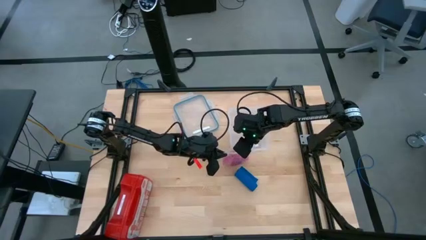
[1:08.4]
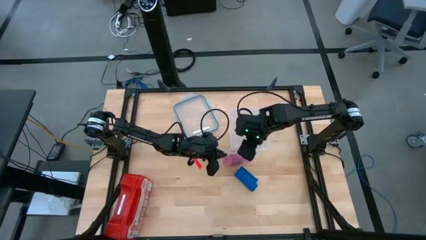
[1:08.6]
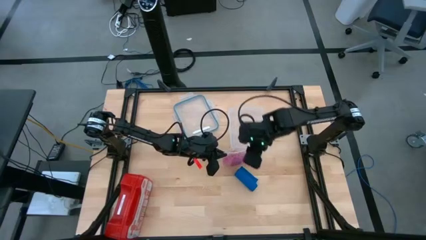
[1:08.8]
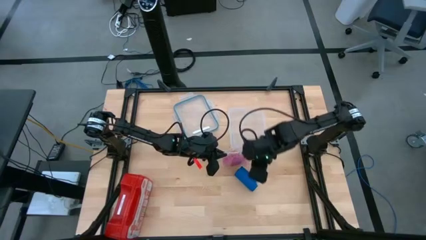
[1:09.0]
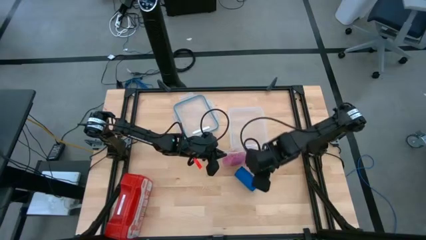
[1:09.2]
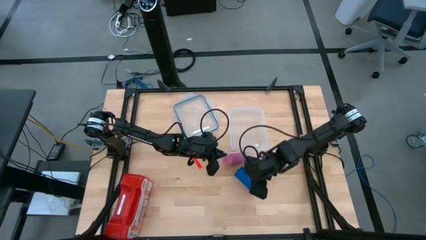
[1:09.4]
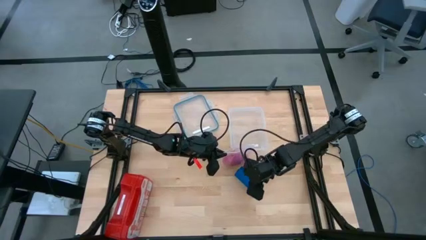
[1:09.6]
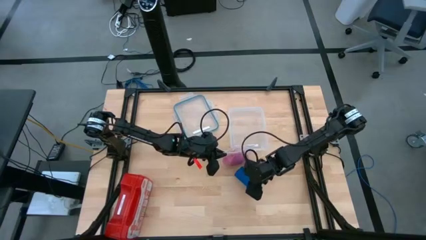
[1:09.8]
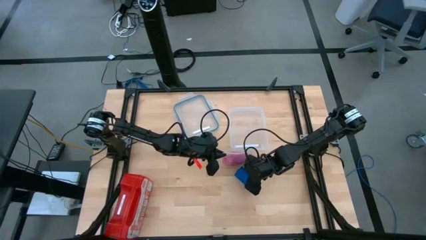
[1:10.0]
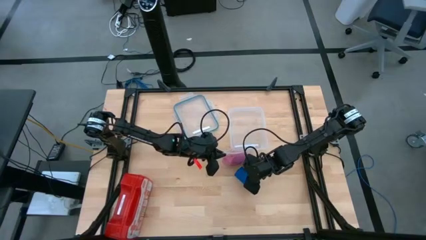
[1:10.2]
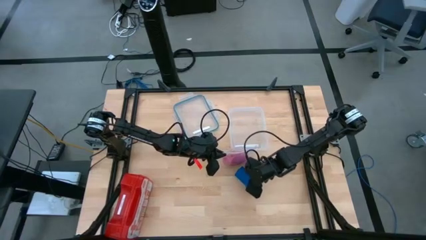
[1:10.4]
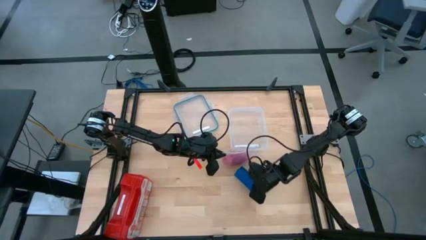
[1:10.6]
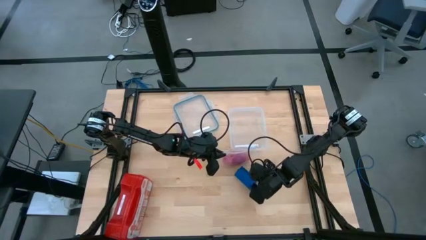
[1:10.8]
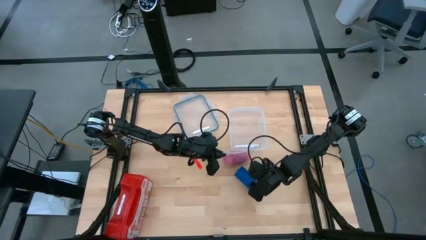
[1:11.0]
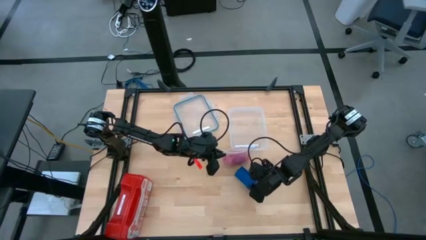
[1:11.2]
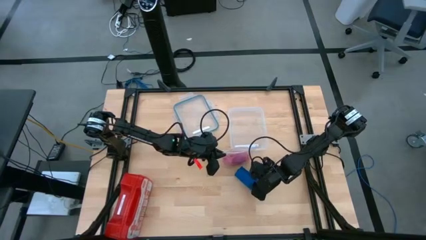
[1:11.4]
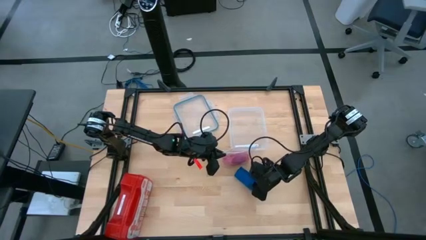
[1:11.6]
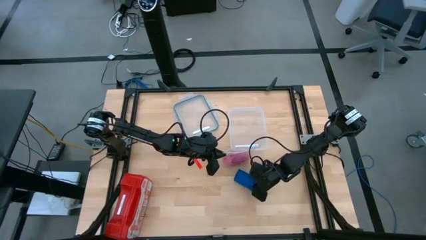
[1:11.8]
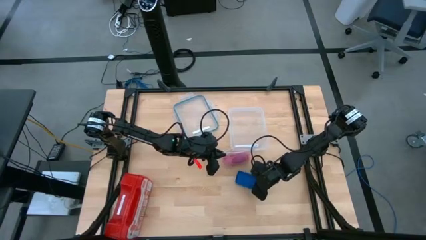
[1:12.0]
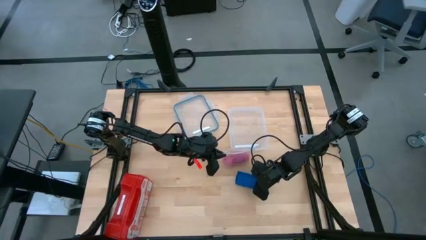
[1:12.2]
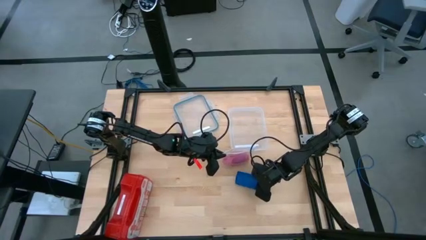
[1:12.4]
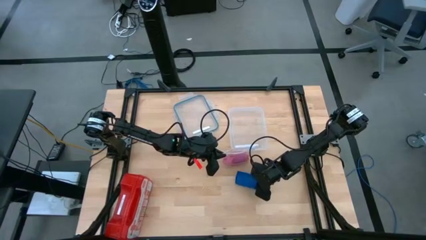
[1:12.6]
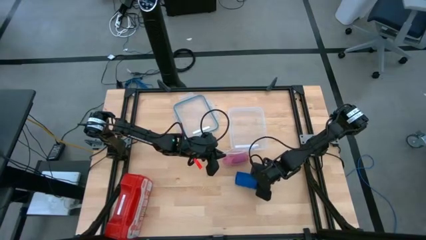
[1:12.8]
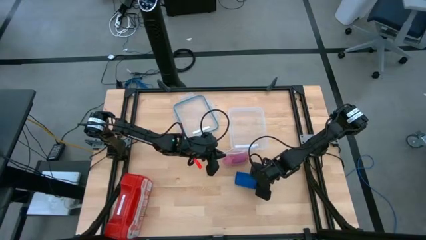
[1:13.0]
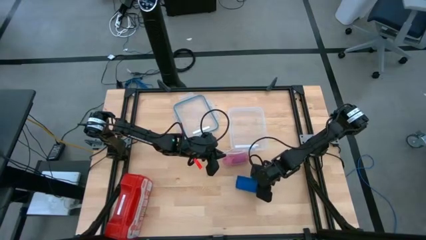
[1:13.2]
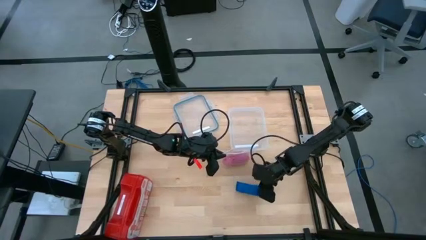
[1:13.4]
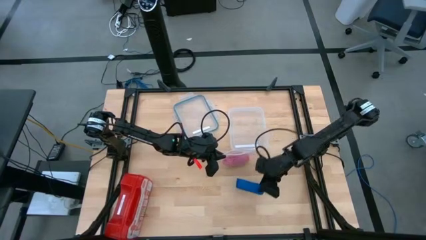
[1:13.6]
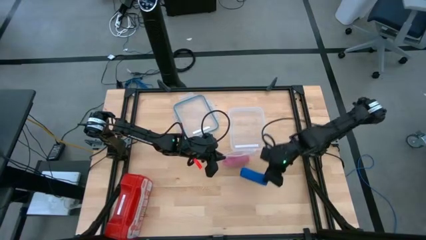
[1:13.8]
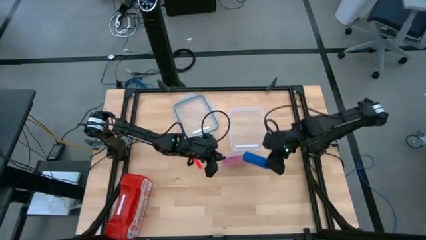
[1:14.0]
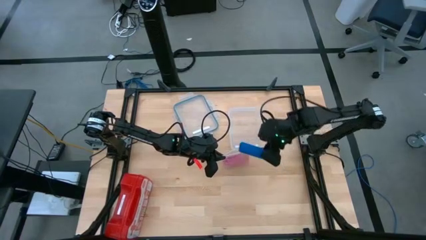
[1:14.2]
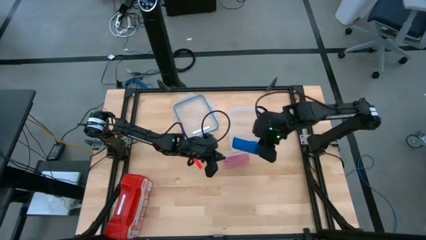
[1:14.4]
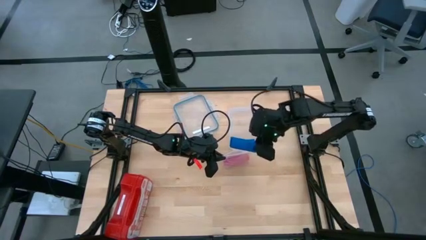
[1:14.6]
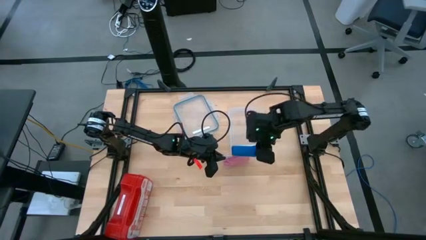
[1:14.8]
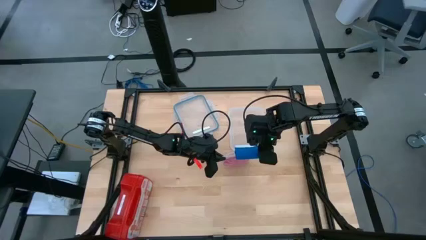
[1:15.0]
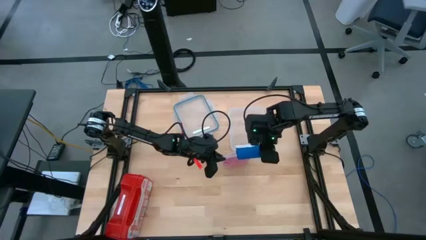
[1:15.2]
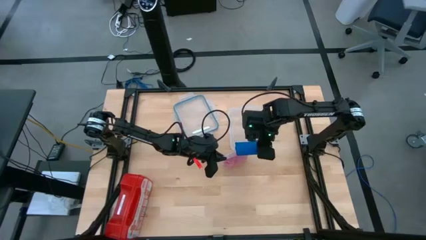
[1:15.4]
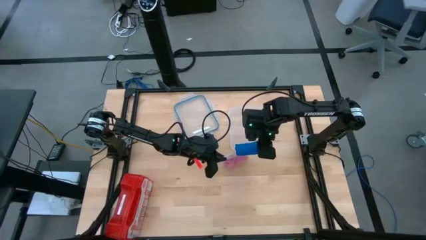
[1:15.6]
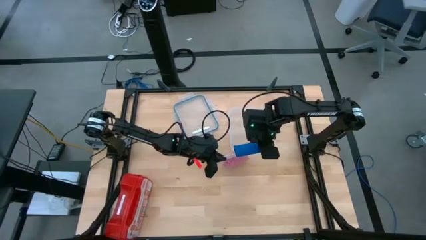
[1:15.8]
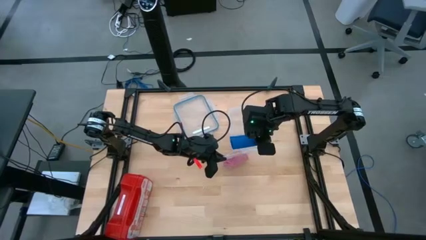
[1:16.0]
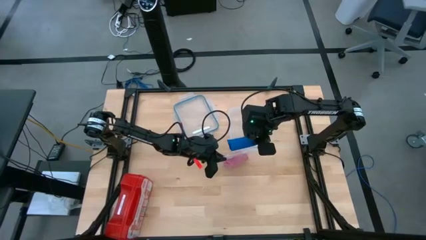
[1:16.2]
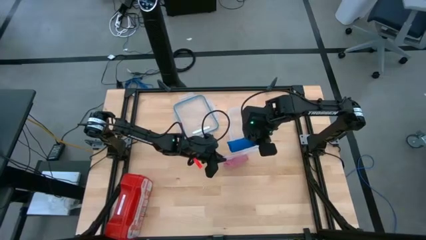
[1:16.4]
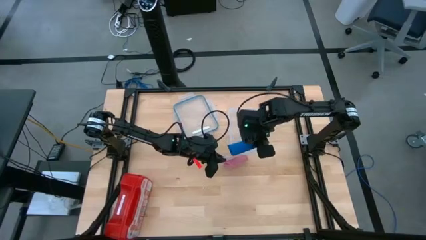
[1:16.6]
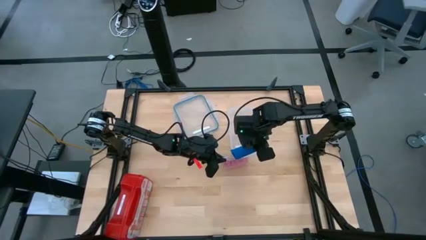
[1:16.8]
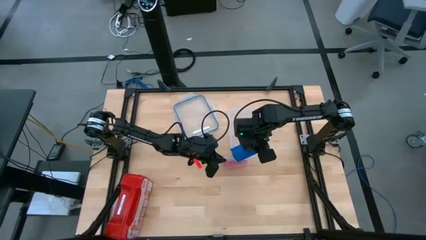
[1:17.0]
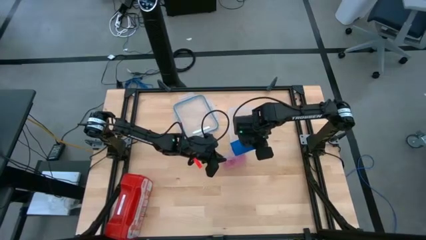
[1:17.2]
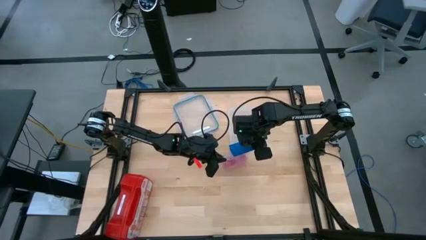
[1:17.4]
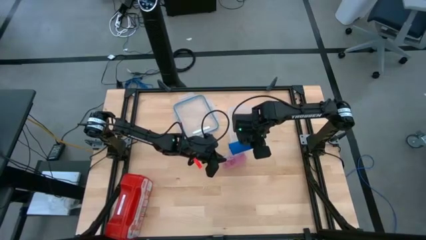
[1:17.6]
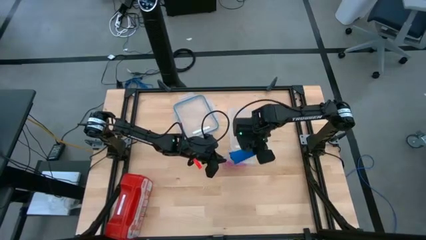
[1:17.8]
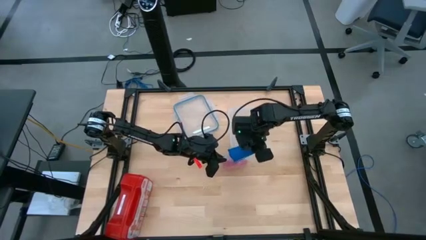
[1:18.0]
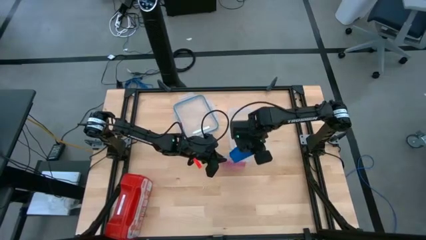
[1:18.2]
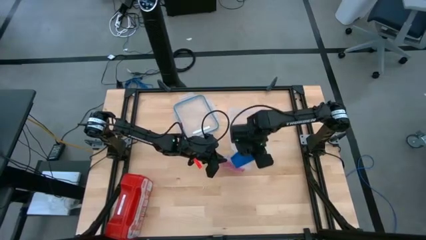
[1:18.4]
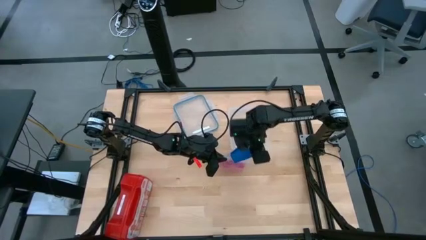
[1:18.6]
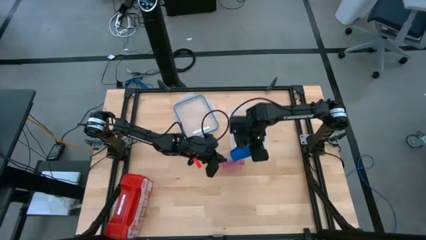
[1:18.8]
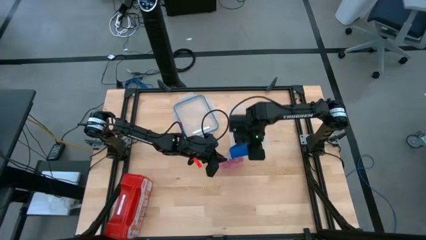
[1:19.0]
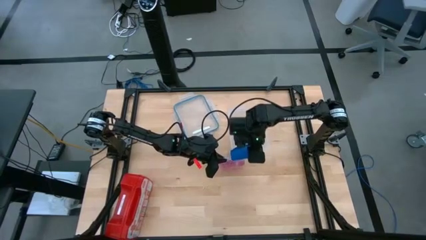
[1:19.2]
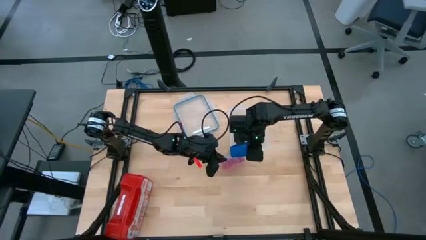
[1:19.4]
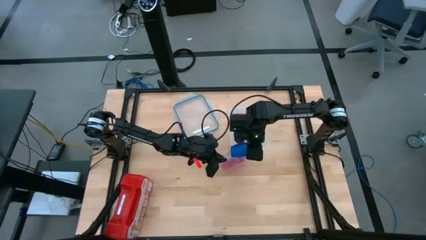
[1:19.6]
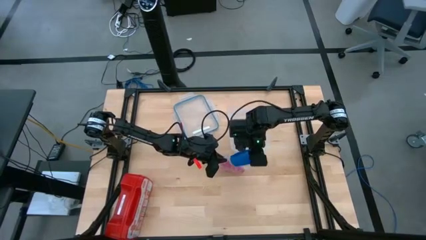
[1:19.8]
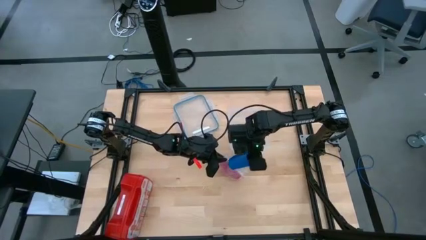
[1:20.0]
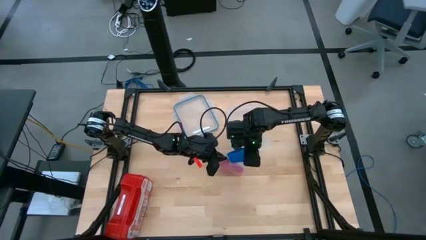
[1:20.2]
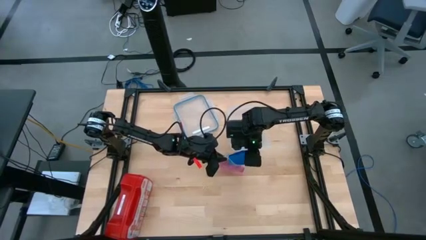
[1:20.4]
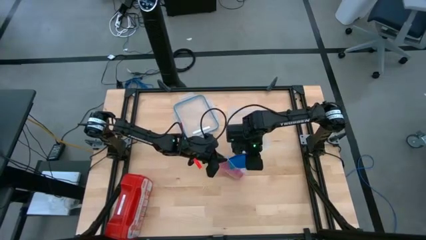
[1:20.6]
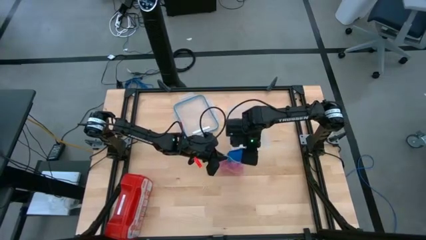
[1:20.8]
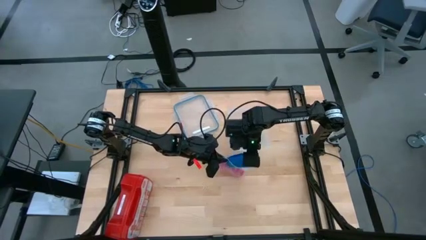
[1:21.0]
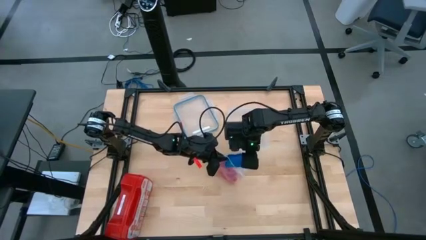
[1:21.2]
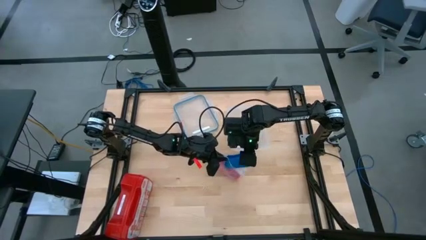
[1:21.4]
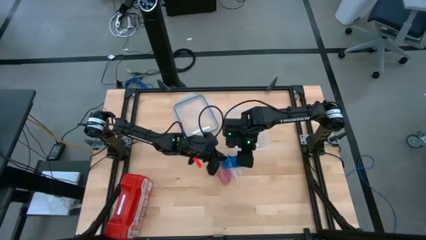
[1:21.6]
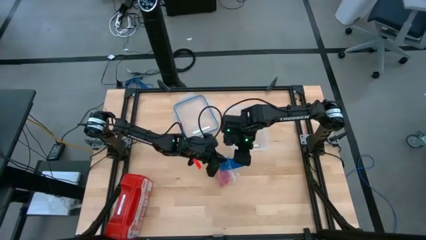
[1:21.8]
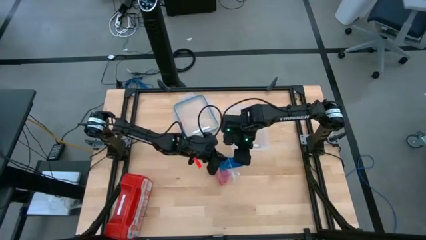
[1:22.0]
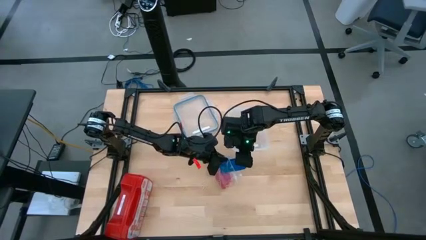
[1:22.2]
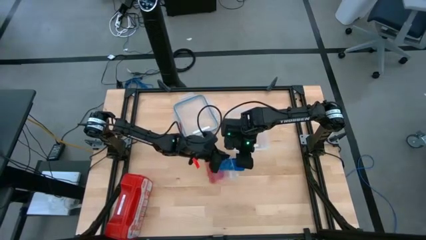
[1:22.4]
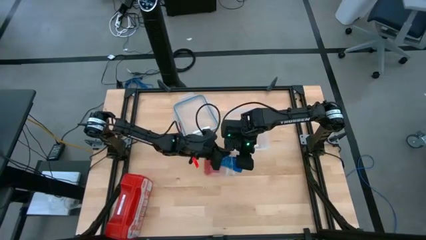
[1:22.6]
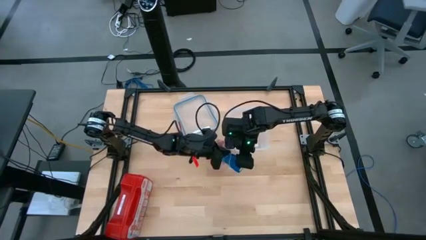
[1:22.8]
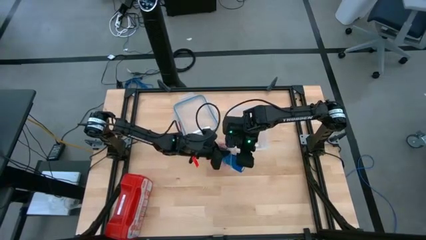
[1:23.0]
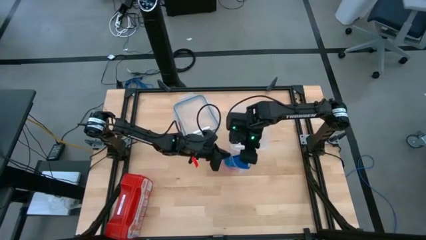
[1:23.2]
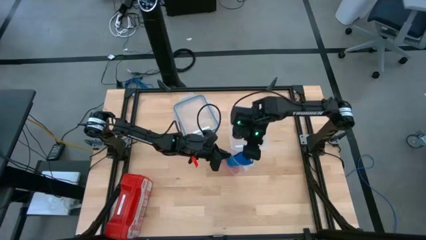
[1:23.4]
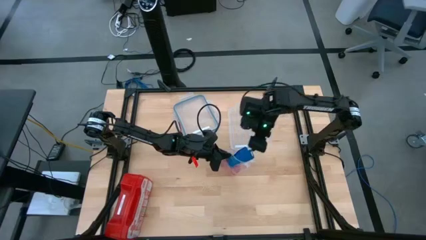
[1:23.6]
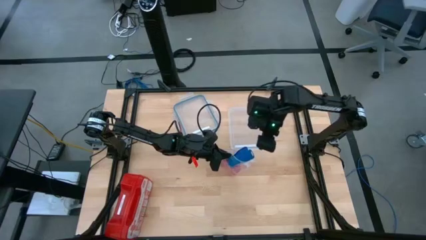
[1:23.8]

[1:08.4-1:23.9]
Task: Roll bandage
Put the blue bandage into the transparent zip bag

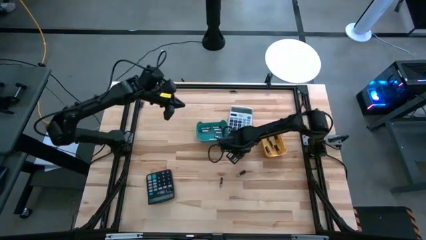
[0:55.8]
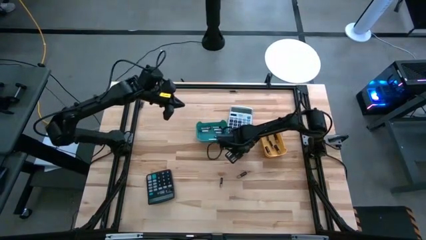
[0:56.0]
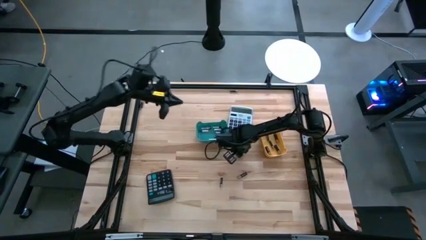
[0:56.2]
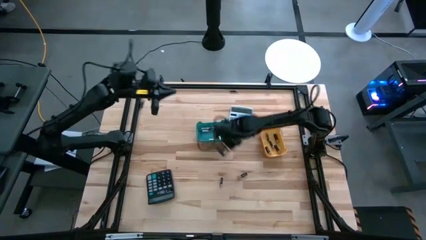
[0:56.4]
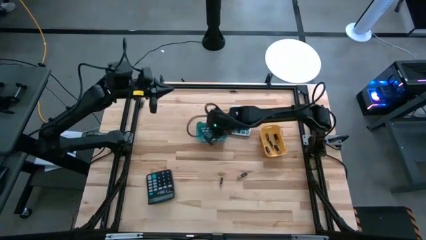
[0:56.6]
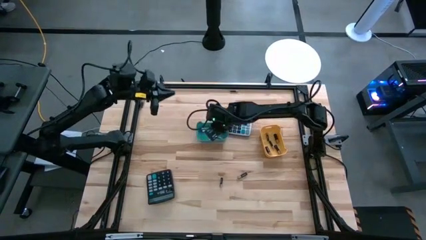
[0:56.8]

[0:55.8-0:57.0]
Task: Sort batteries
Put the silver battery into the blue bin

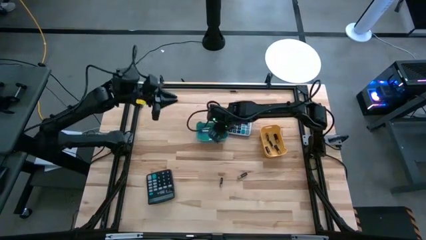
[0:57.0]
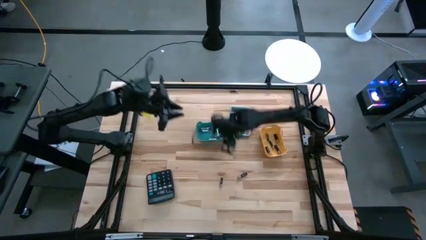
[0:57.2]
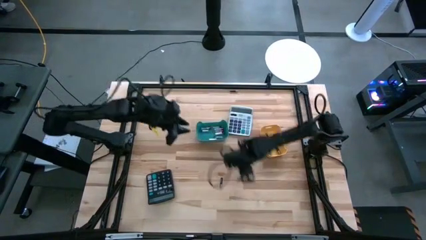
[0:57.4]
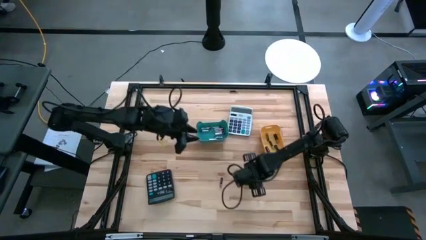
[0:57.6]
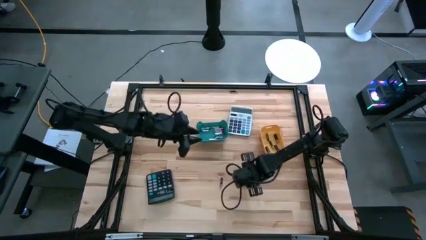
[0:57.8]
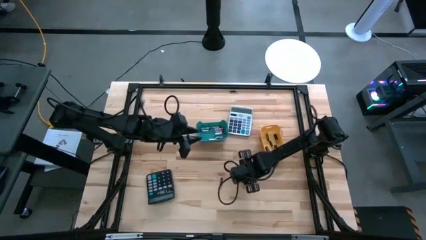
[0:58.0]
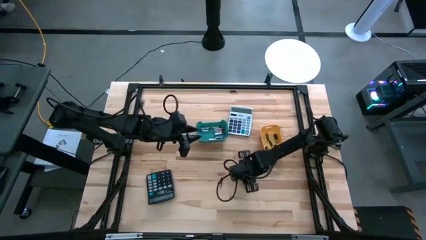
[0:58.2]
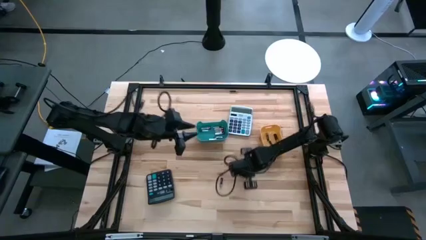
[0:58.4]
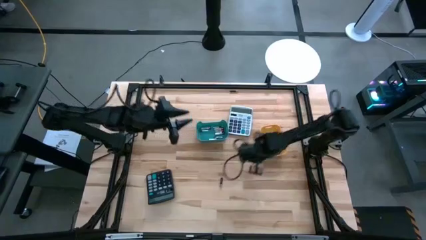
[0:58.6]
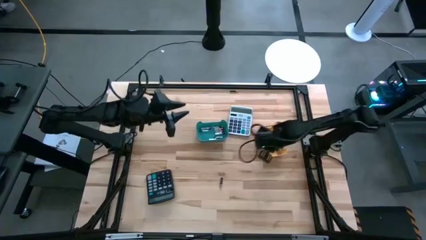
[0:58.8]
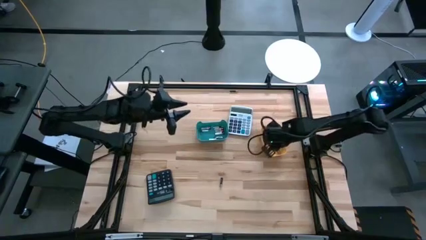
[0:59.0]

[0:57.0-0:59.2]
Put the black battery into the yellow bin
